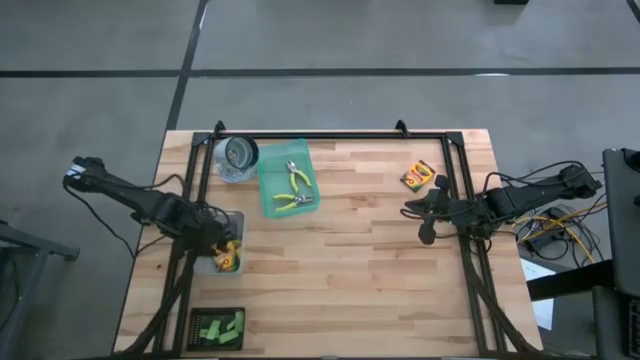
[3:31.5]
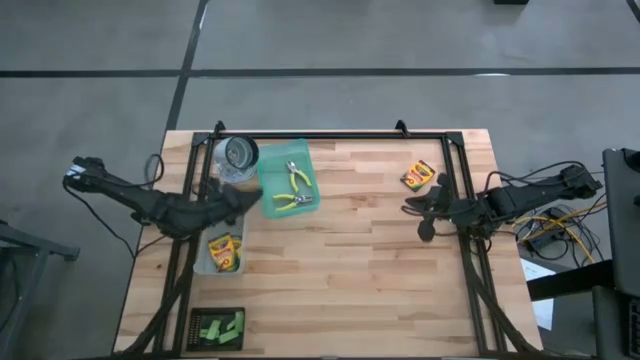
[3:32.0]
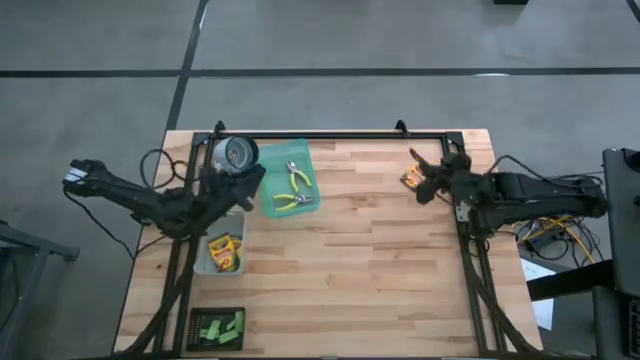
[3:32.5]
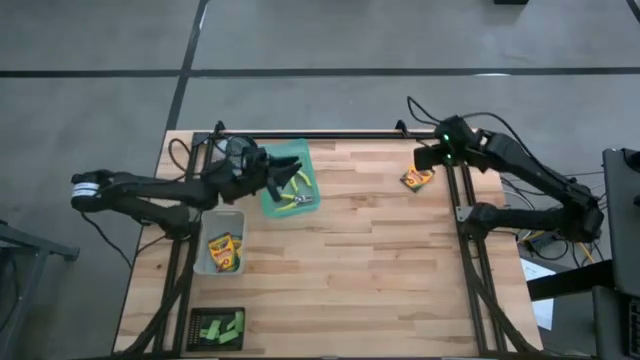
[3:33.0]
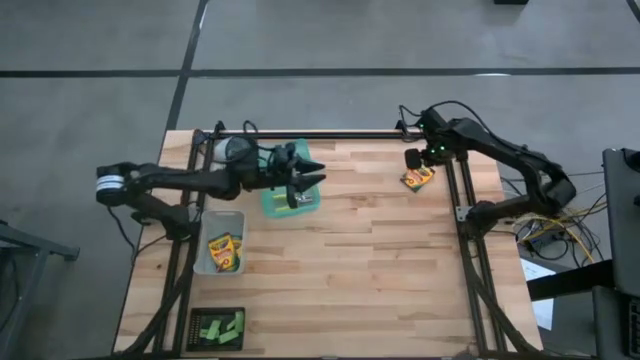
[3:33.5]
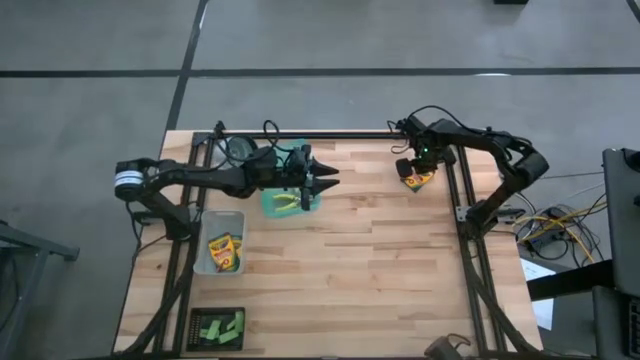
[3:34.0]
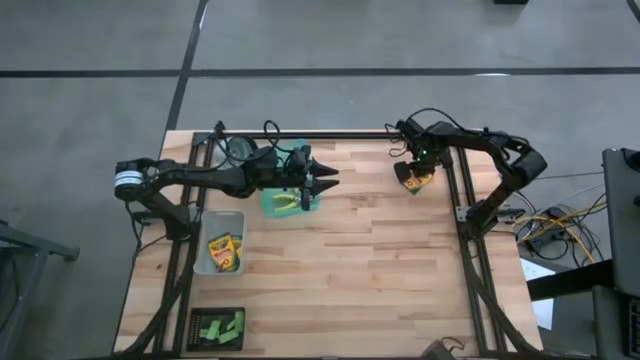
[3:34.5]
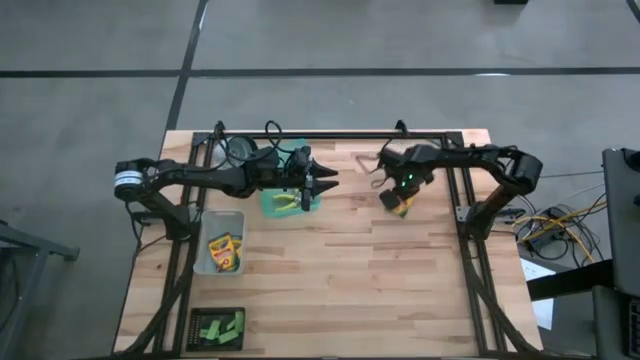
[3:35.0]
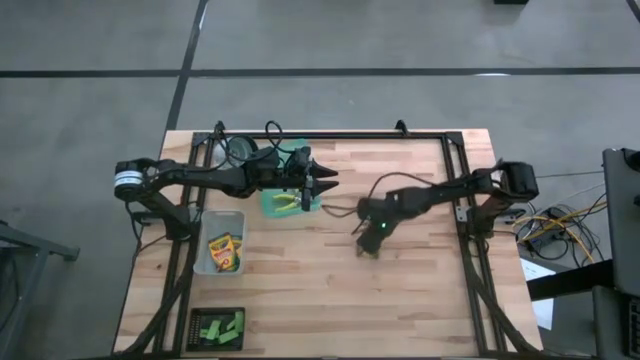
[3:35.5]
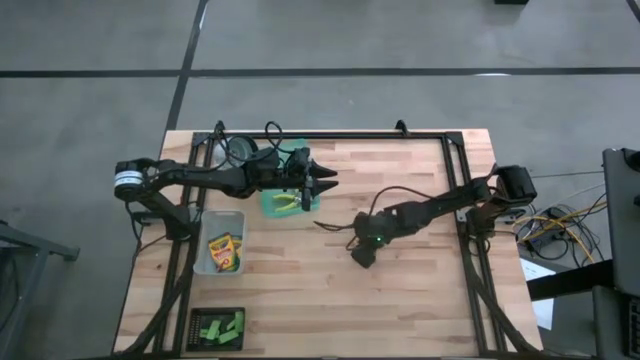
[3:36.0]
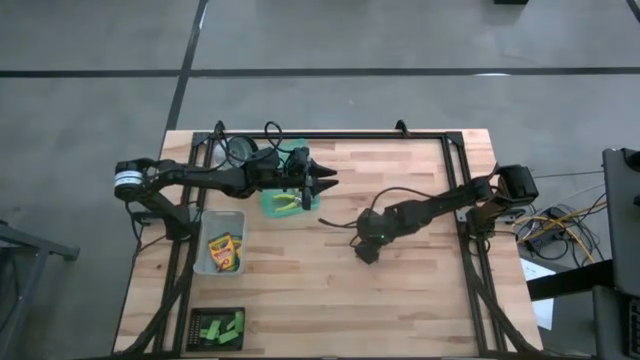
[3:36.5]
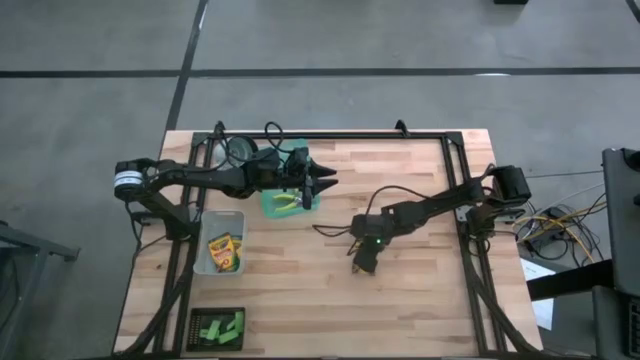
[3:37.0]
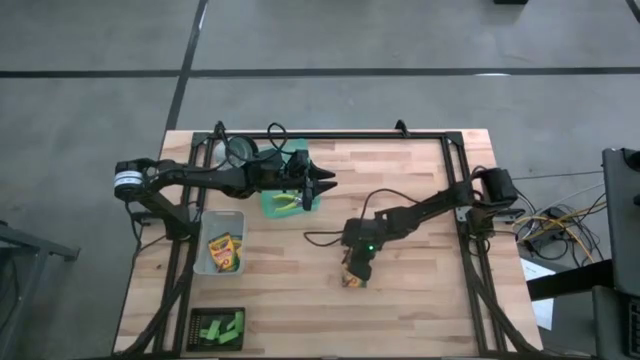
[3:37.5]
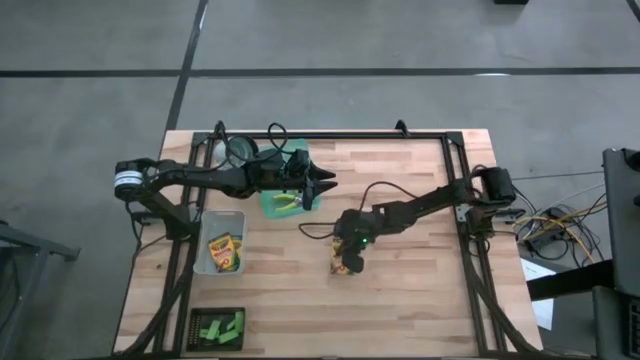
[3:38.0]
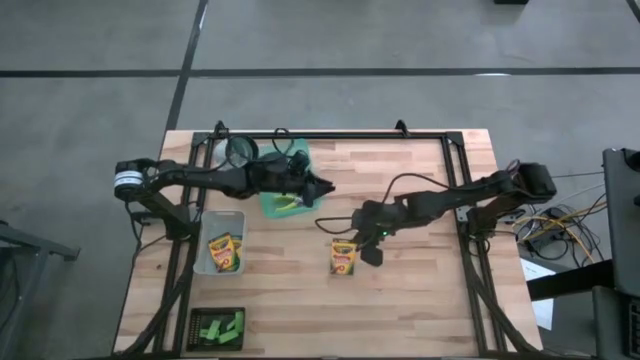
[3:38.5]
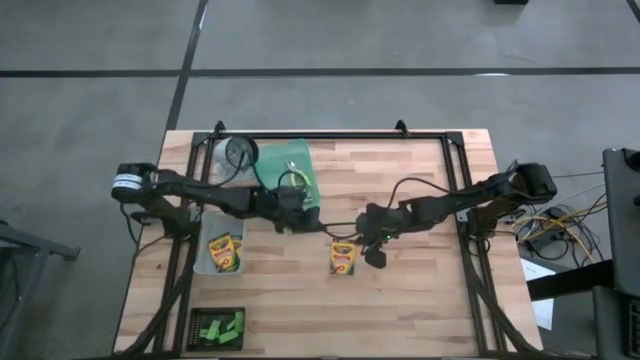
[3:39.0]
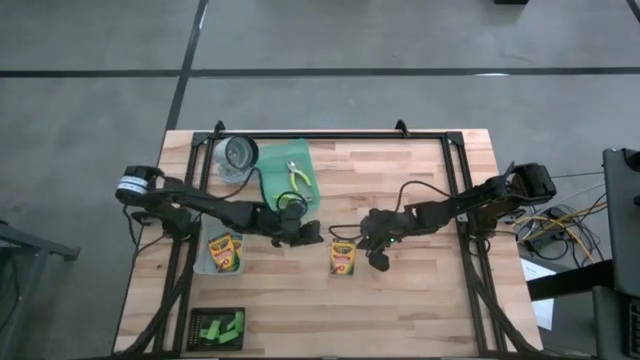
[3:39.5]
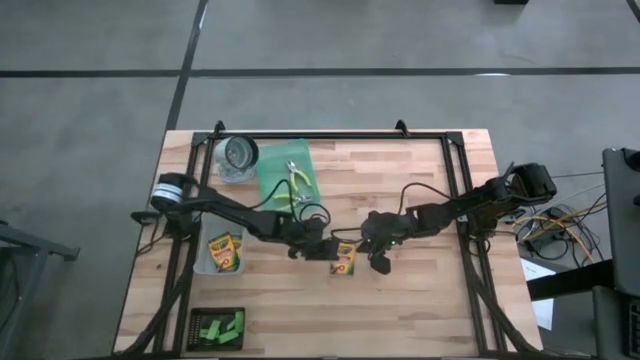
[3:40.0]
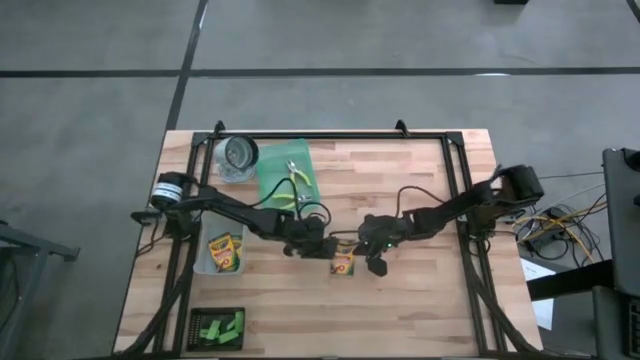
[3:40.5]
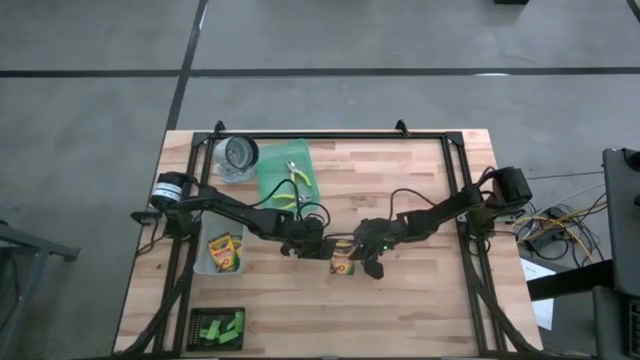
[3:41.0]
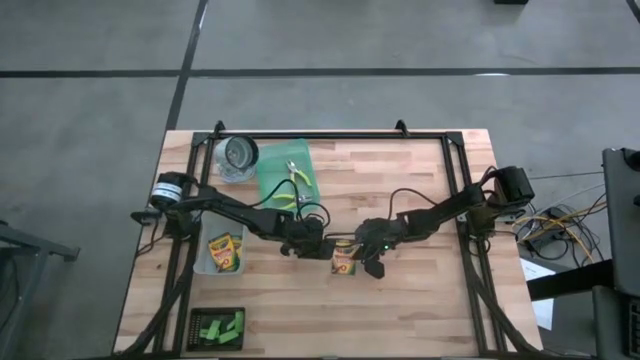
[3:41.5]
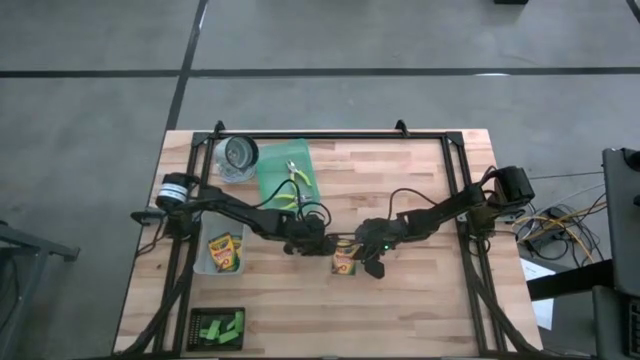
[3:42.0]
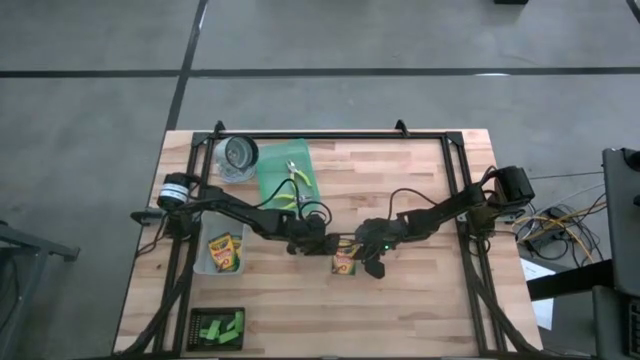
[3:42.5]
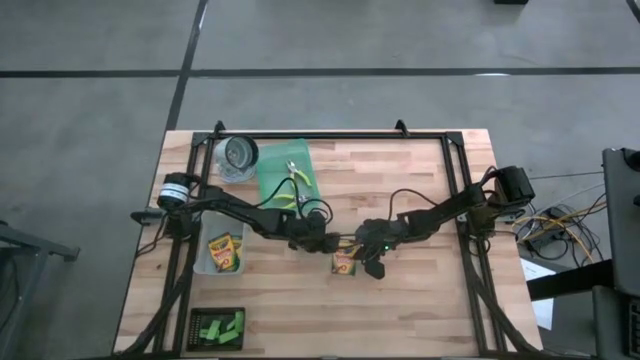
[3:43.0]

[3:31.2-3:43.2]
Task: Pick & Place School Supplies
Put the yellow crayon box into the gray bin

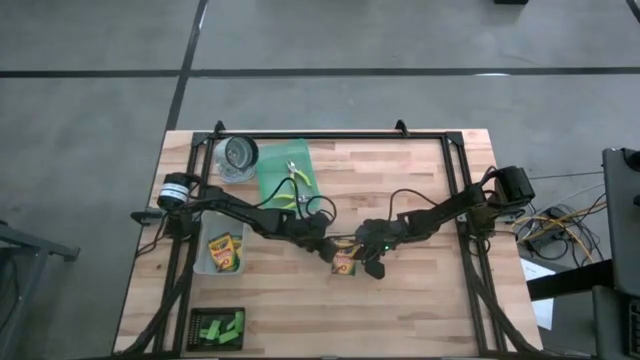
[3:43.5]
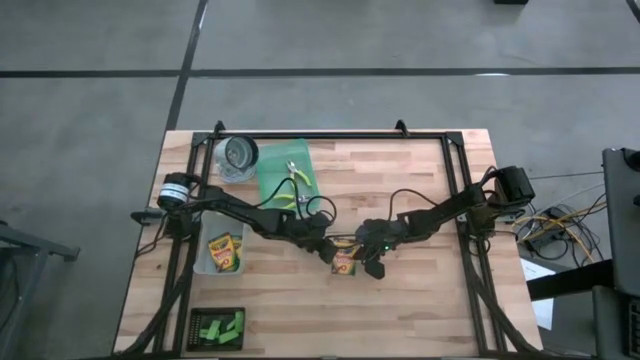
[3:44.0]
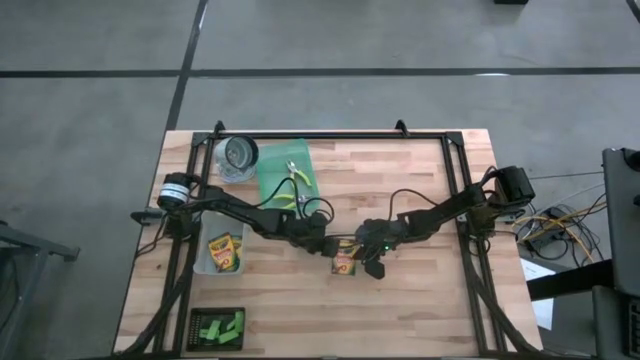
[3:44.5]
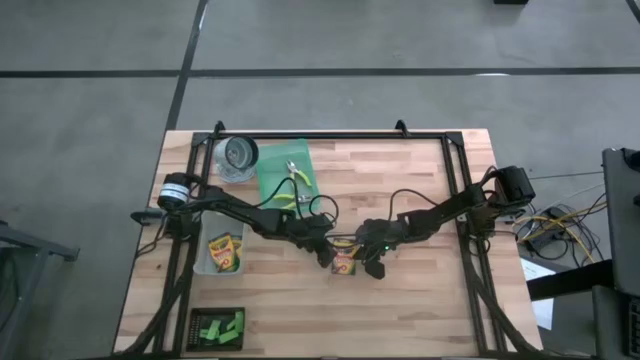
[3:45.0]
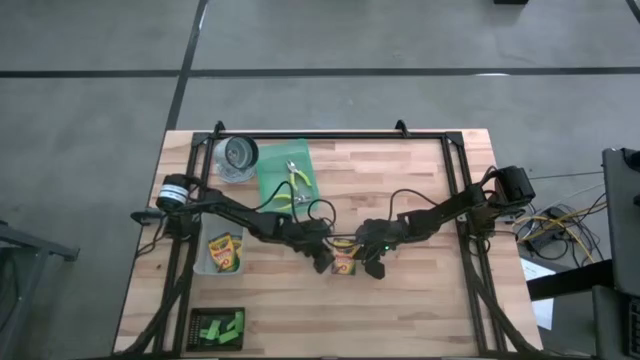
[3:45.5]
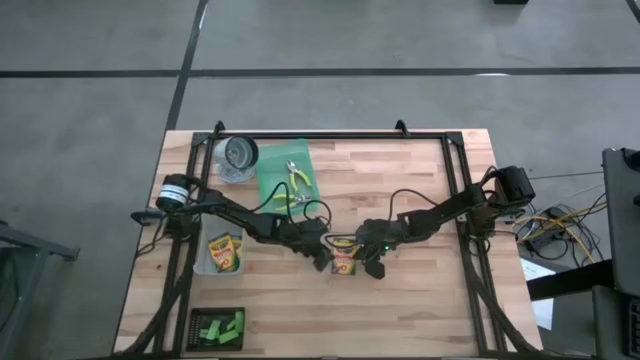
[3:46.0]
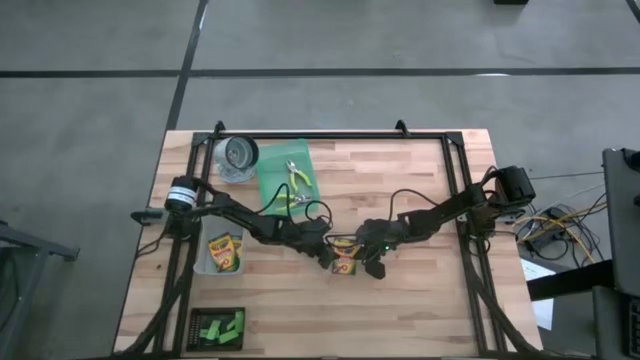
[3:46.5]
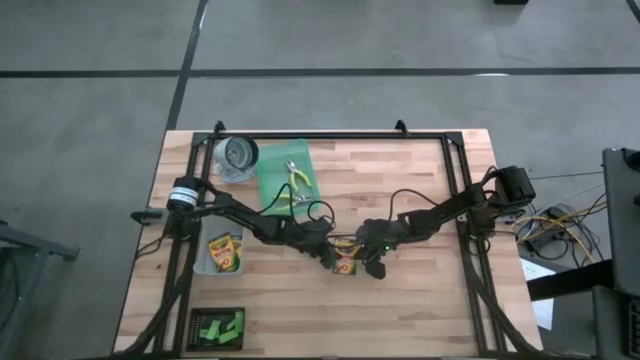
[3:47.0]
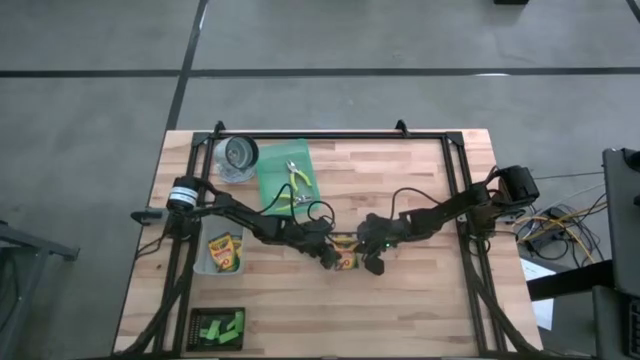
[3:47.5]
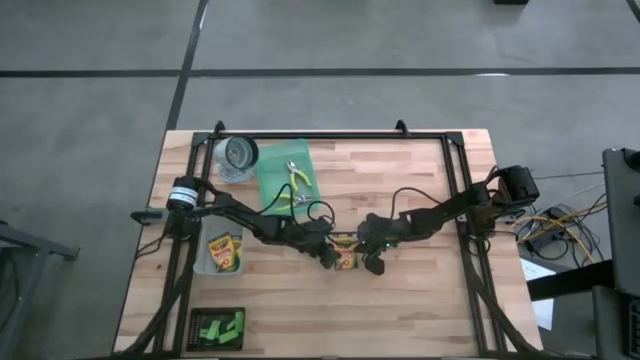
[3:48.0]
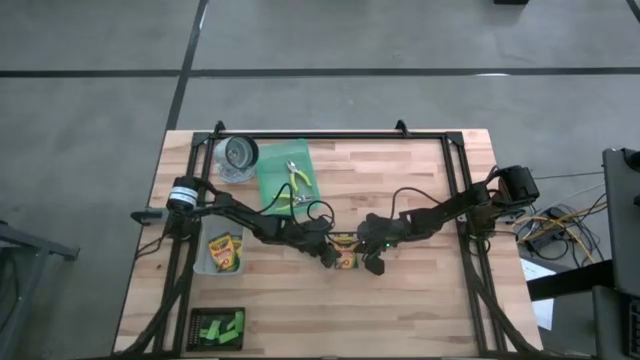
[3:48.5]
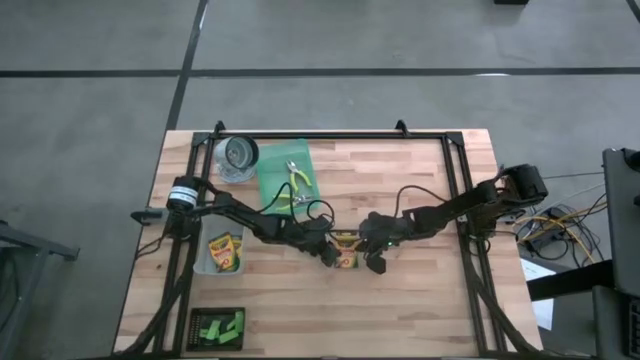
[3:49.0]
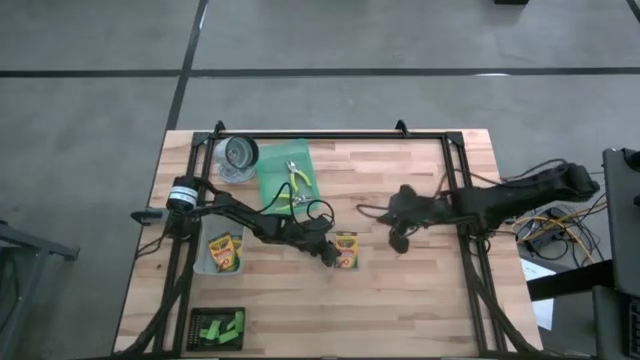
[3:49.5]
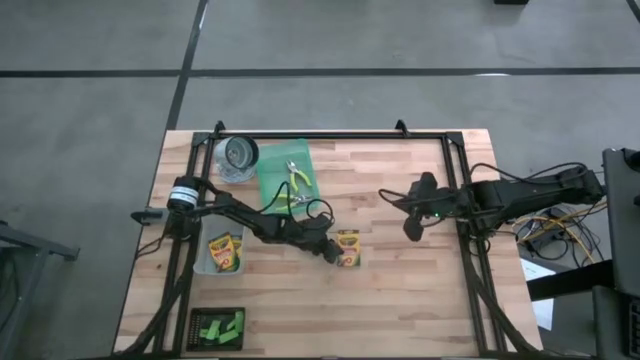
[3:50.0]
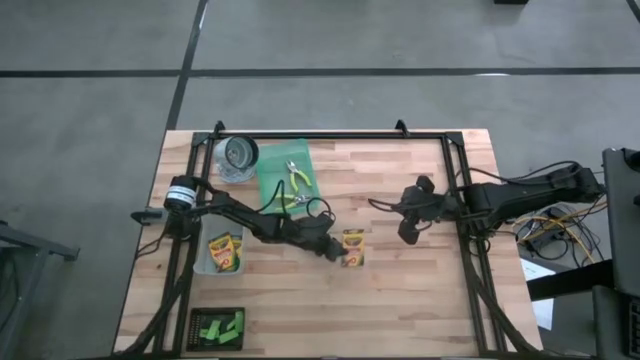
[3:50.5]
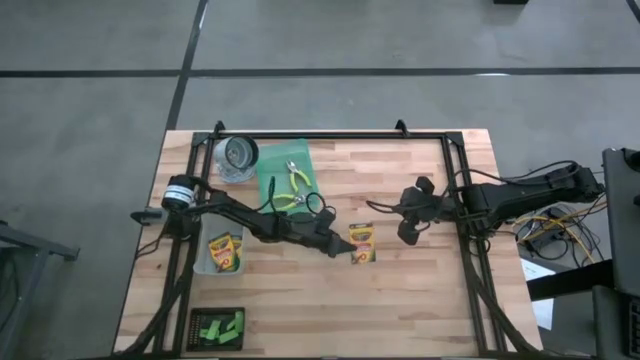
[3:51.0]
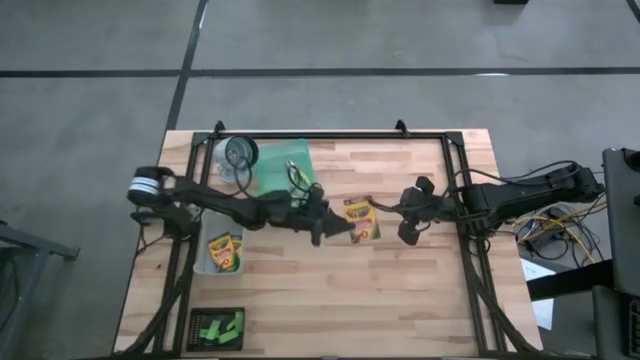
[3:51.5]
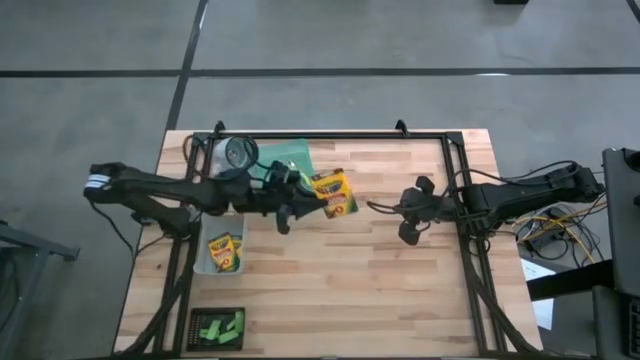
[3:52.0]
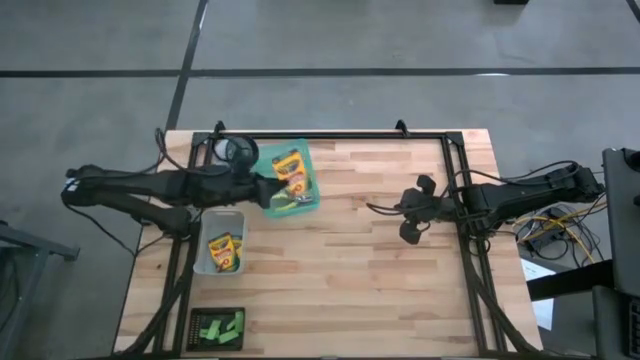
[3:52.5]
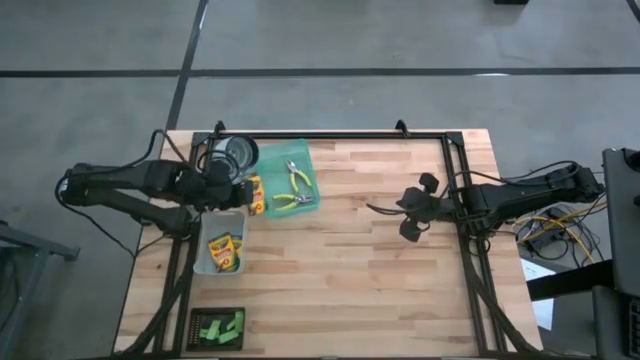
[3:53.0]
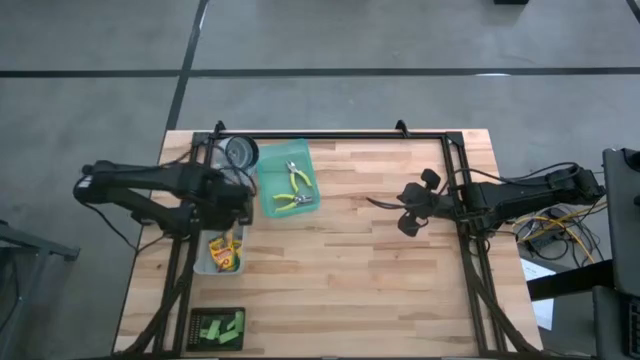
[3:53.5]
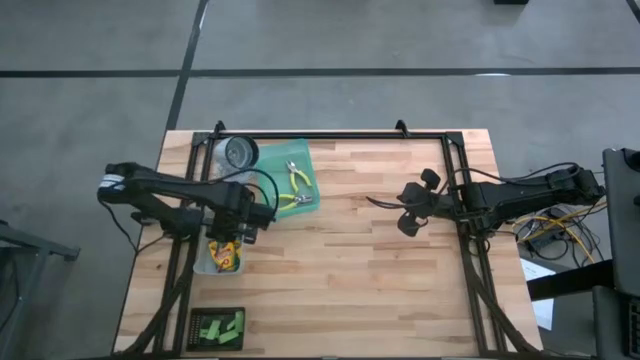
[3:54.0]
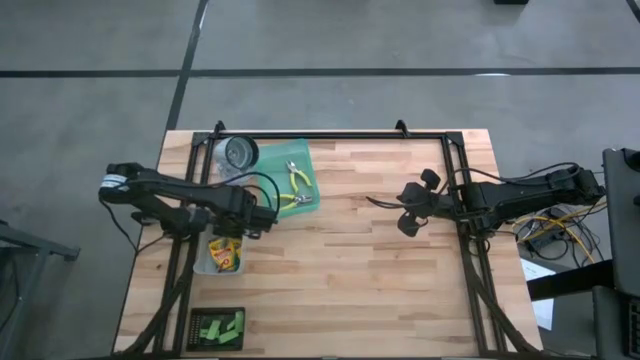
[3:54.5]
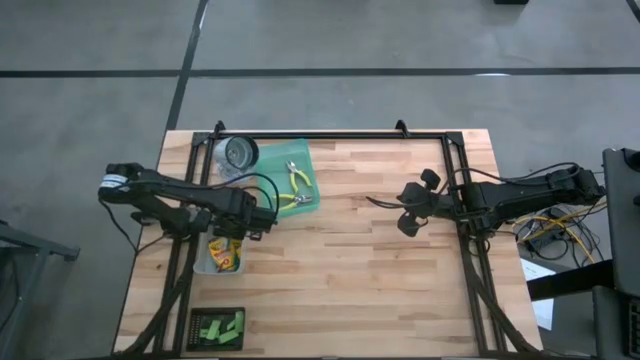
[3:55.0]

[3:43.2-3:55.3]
Put the yellow crayon box into the gray bin
